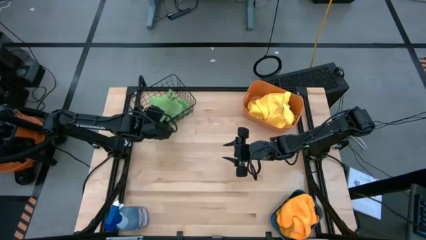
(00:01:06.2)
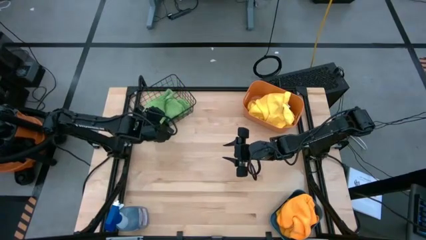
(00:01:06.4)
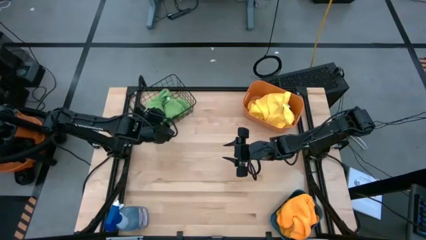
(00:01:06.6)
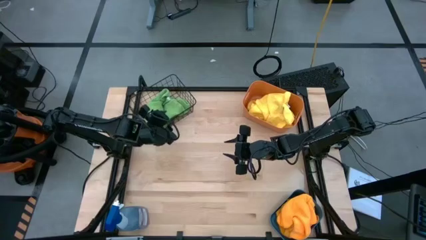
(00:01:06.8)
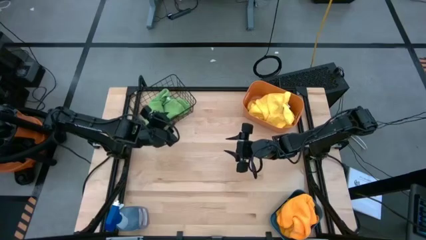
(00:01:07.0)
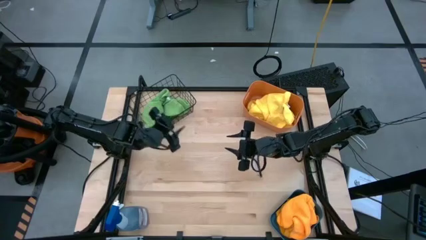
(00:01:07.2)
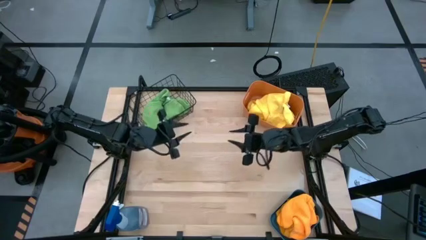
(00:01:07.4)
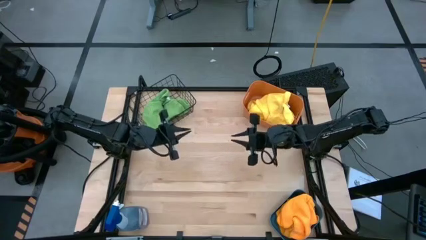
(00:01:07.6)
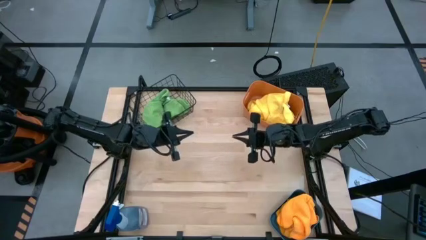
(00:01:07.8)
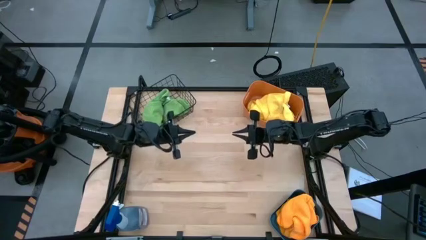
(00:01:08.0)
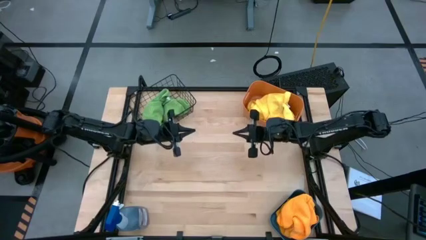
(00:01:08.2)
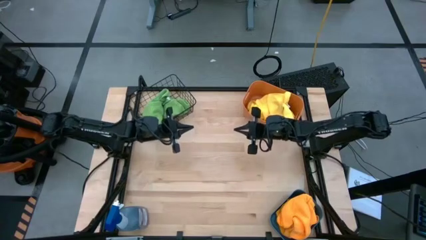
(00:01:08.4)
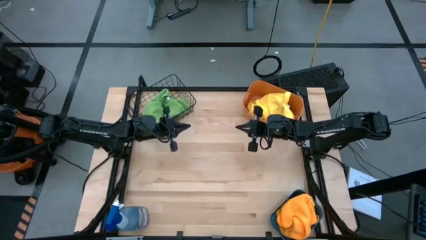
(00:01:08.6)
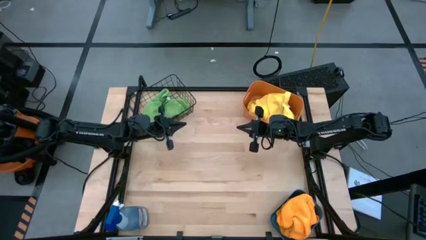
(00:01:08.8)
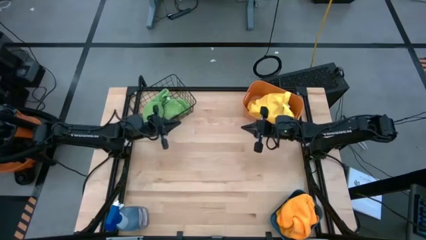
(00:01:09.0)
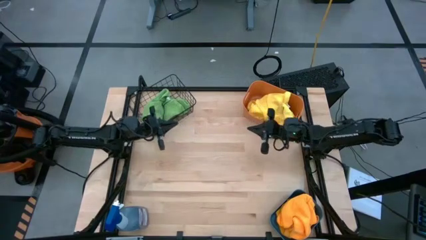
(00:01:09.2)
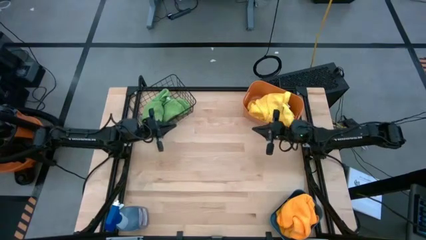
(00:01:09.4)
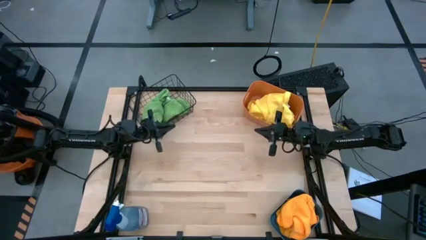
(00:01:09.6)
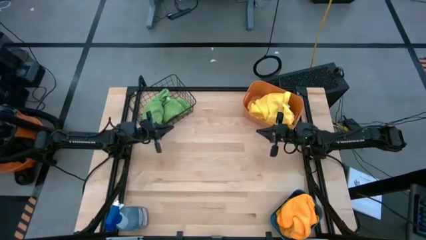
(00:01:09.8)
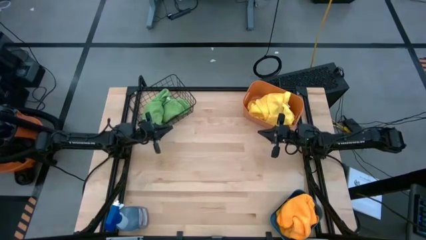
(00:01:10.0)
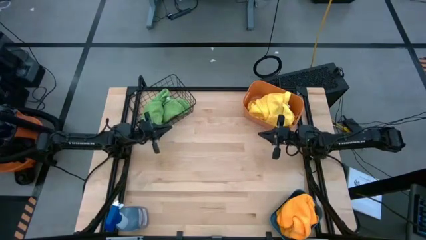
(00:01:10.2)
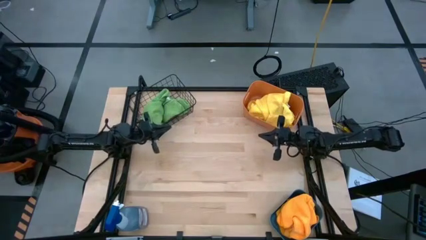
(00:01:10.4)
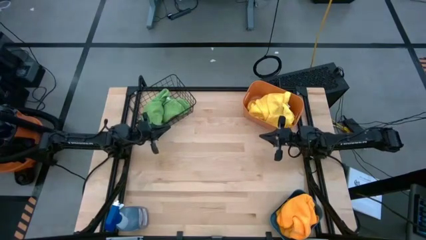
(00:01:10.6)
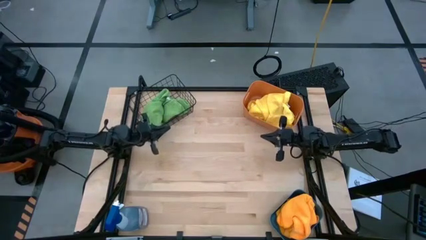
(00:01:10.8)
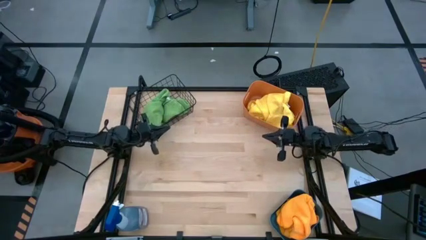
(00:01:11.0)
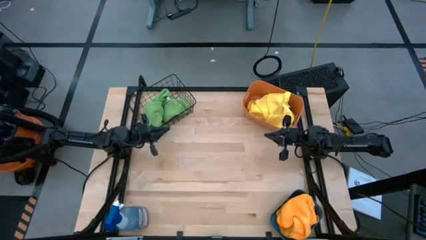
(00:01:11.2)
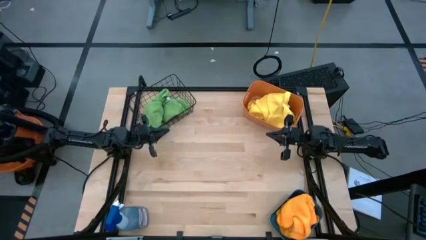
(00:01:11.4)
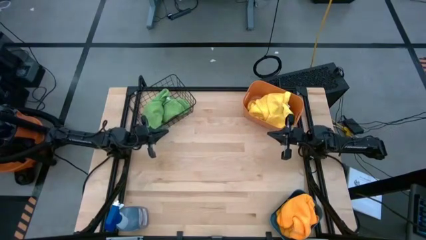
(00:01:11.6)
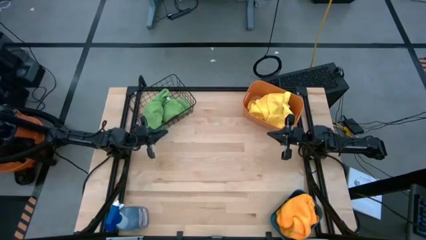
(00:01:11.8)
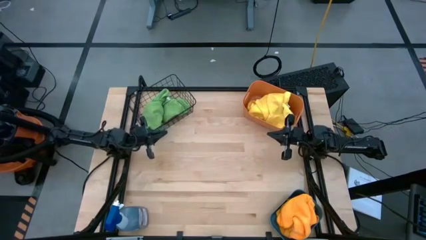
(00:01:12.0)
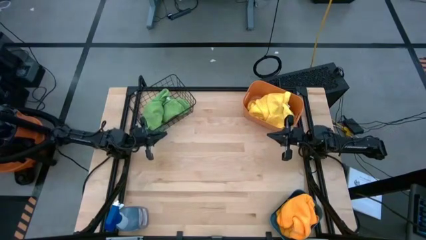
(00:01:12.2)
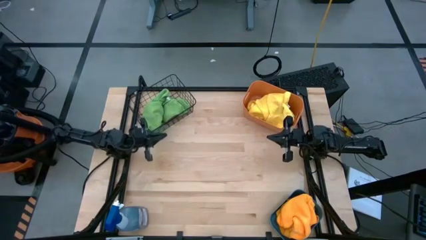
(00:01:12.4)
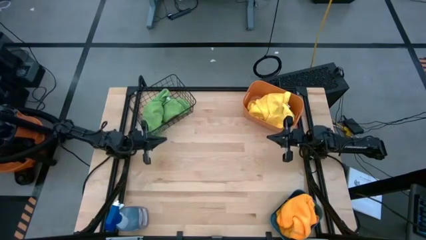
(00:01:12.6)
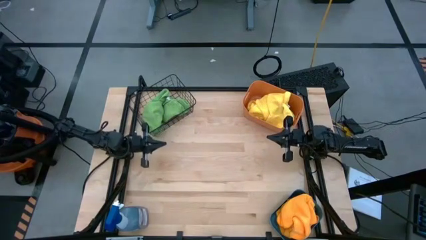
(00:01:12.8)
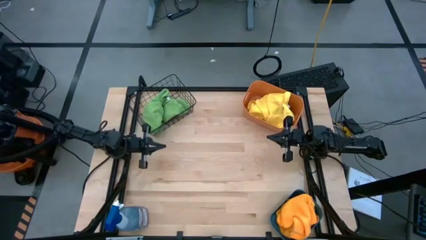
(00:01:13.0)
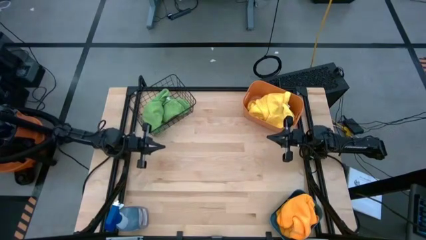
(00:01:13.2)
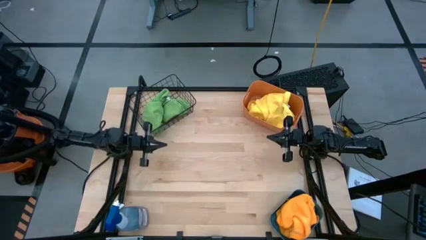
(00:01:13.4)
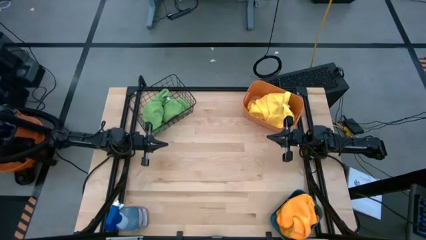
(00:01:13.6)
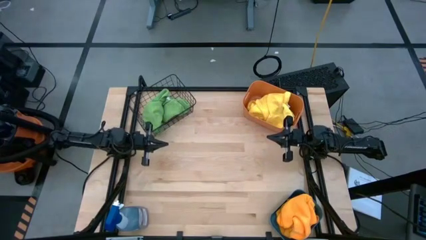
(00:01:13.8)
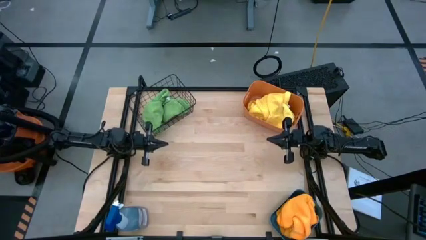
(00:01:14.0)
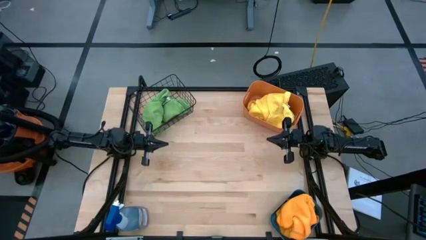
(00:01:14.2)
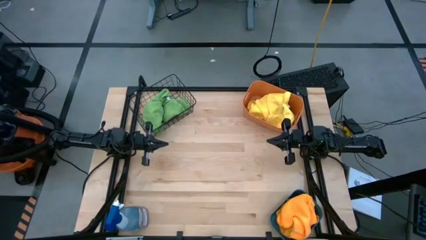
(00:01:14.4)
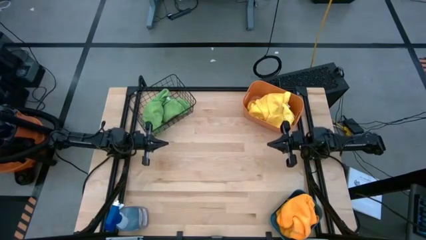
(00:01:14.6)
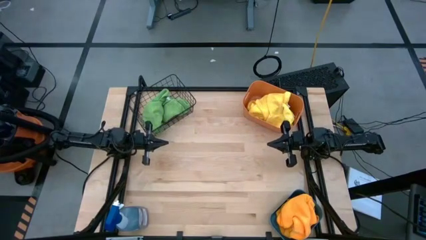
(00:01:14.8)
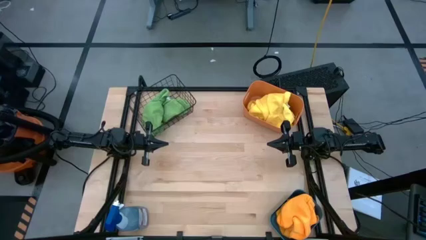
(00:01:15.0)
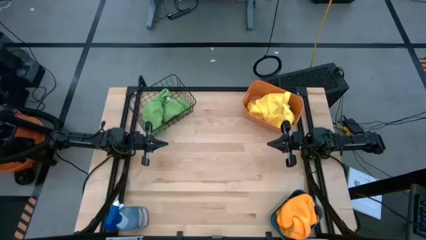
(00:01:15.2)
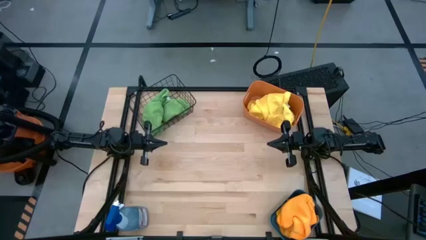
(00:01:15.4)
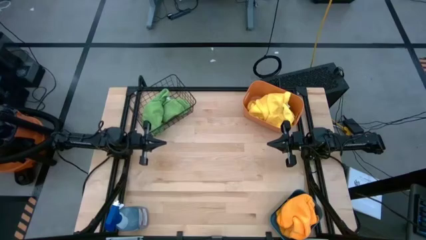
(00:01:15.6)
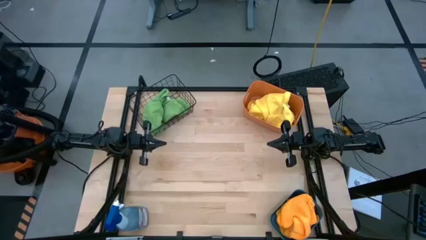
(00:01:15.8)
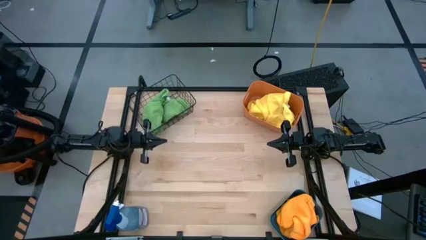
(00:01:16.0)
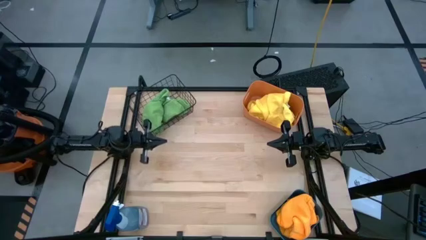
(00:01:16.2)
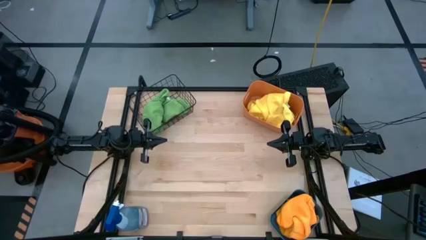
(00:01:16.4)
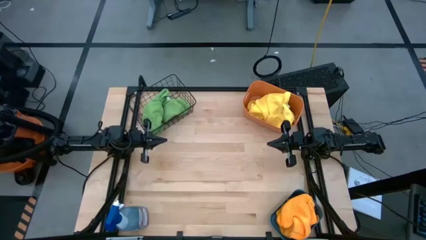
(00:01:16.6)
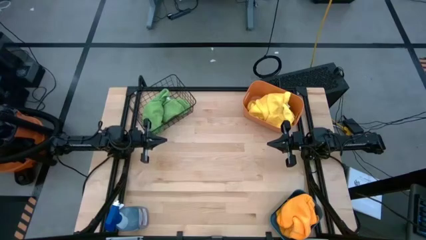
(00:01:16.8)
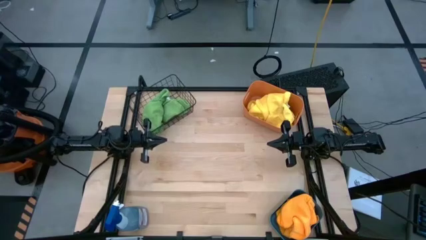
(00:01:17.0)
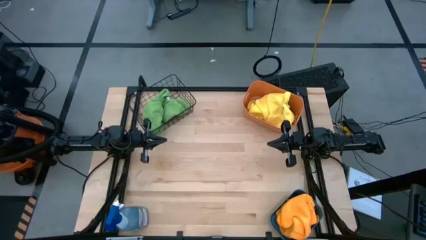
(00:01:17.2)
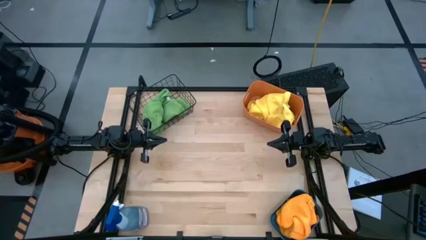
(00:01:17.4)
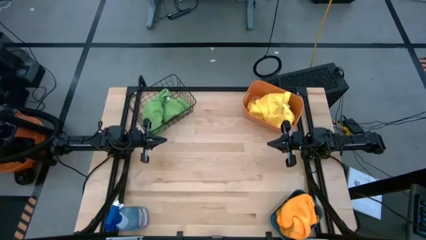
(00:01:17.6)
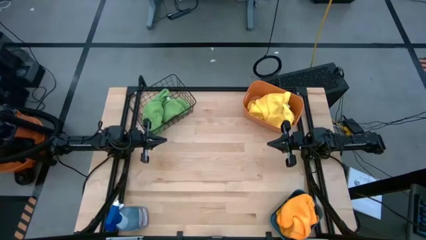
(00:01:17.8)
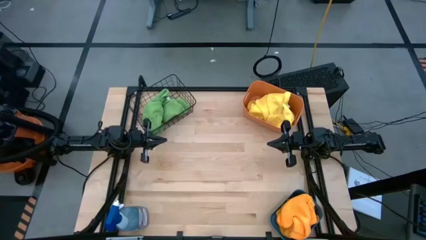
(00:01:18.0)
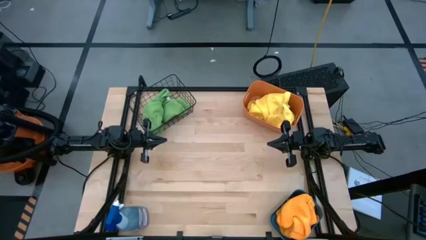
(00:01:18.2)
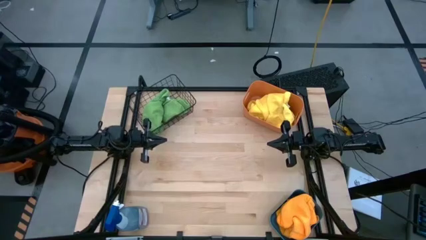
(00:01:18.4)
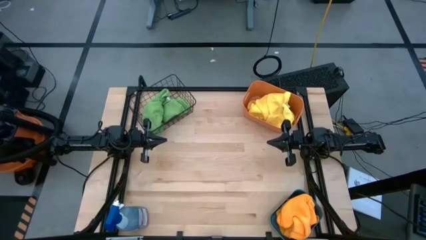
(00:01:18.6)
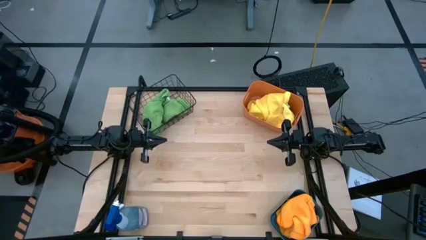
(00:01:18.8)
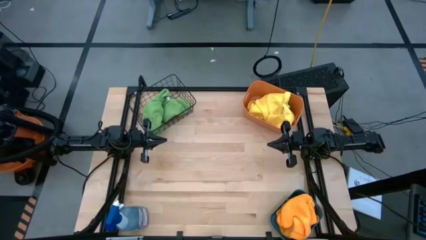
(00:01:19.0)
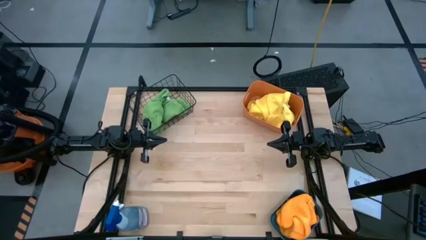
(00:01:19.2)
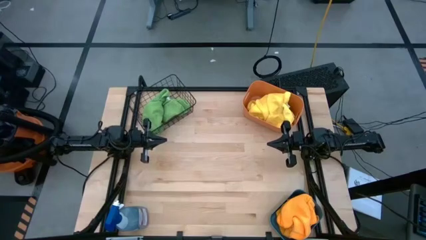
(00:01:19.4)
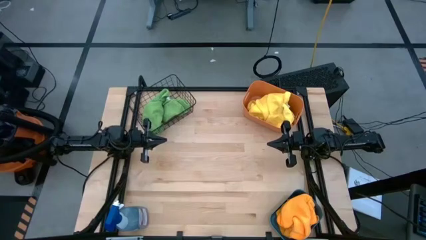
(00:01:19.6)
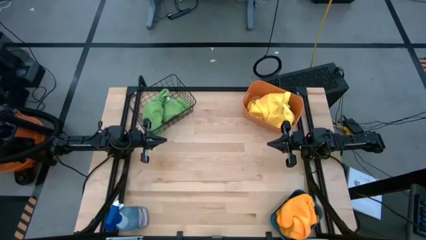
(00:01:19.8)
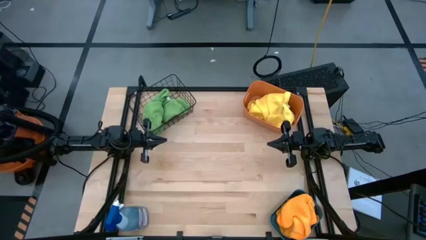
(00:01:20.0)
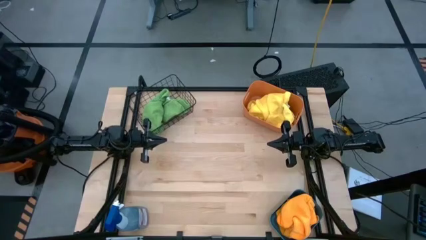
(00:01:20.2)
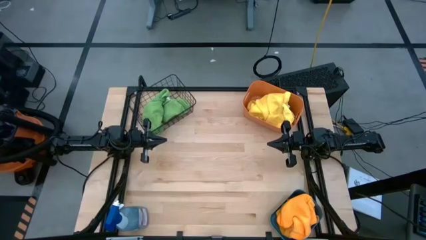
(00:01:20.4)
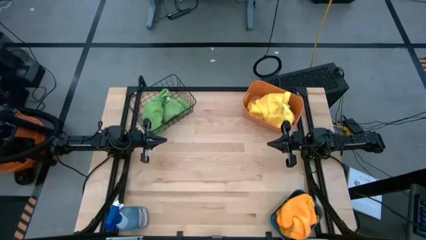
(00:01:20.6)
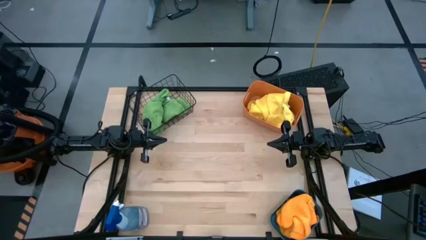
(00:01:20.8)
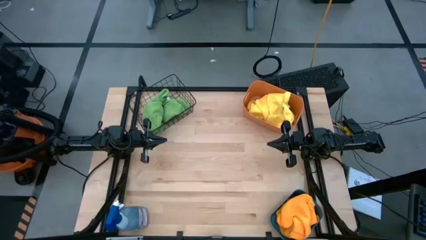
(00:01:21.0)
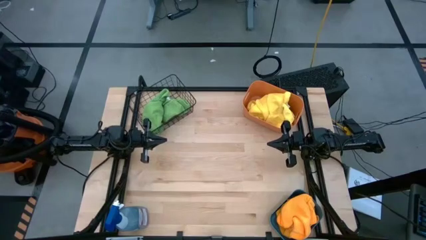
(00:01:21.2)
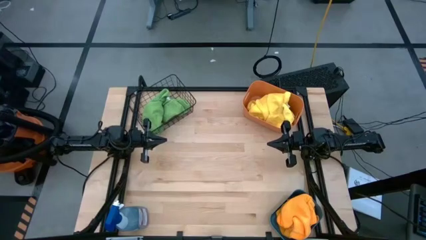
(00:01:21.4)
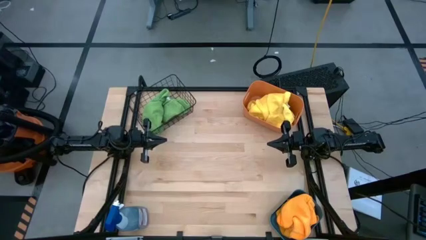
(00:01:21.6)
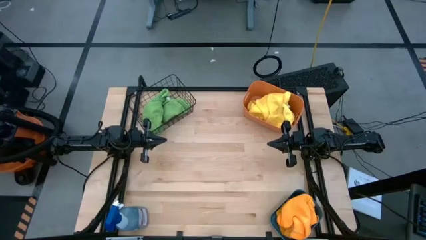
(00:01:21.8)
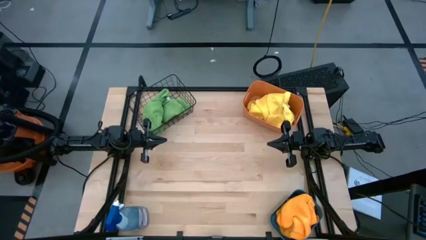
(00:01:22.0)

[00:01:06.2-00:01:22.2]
Task: Sort microfiber towel by color & place in baskets
Return to Home Position
